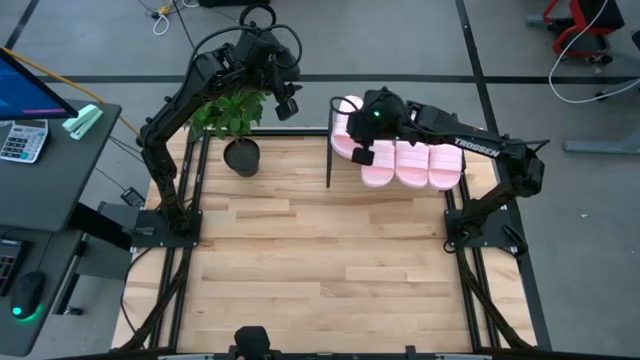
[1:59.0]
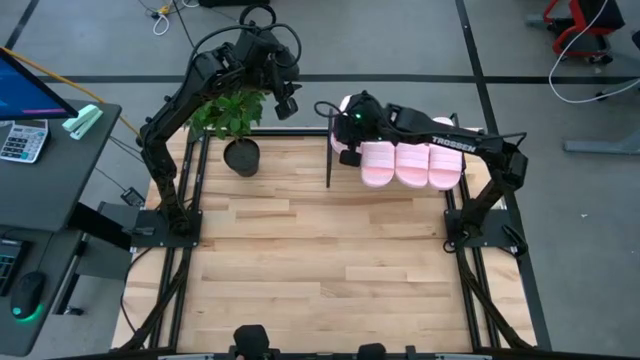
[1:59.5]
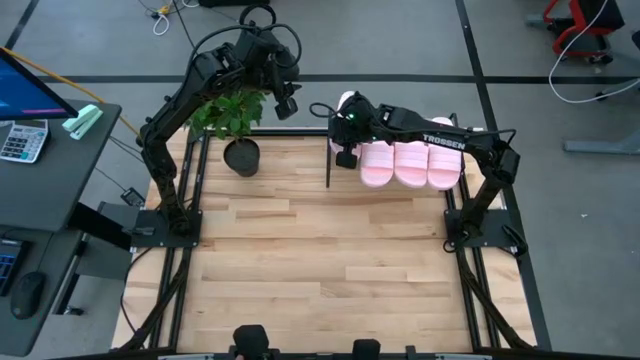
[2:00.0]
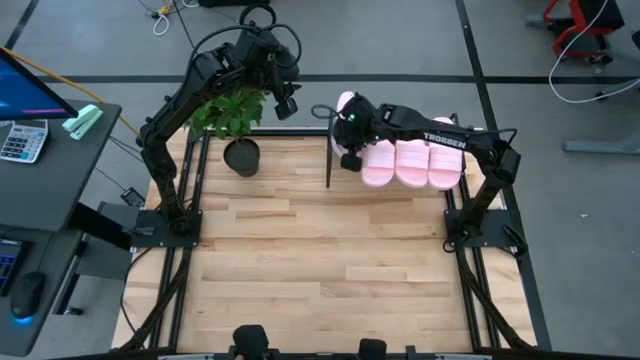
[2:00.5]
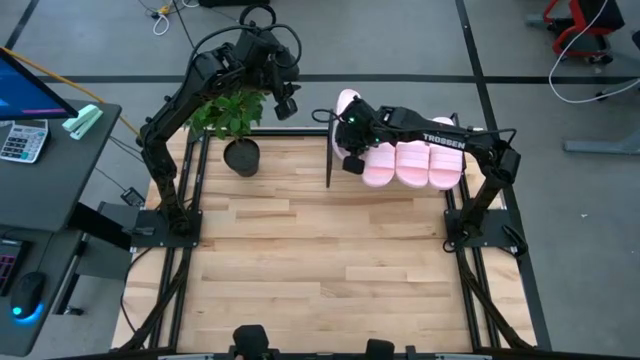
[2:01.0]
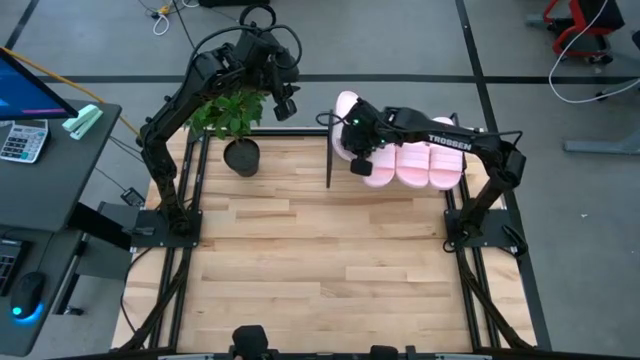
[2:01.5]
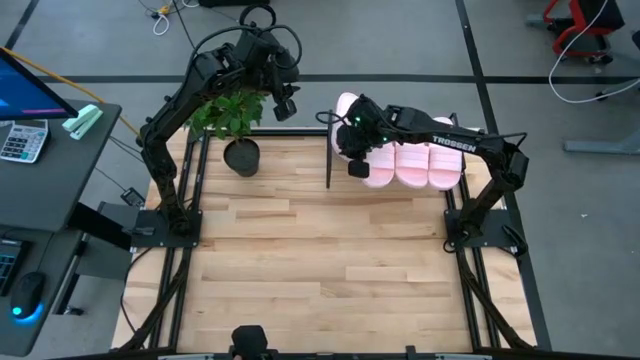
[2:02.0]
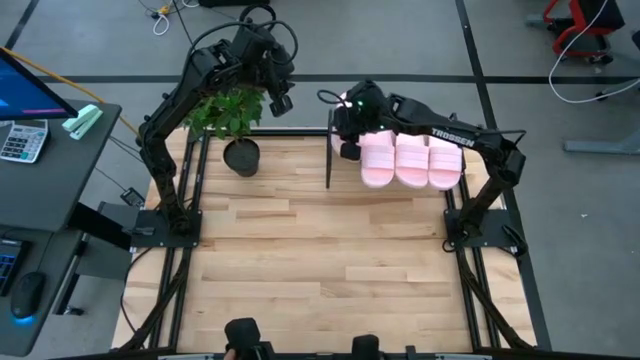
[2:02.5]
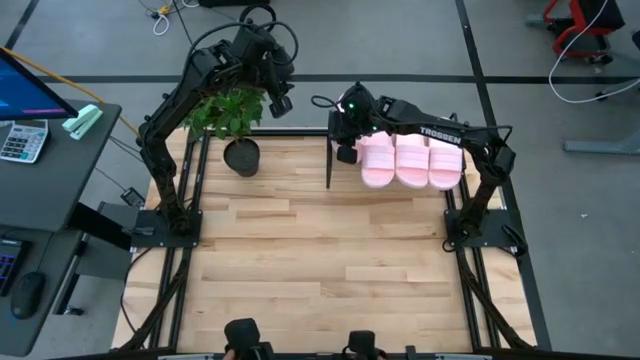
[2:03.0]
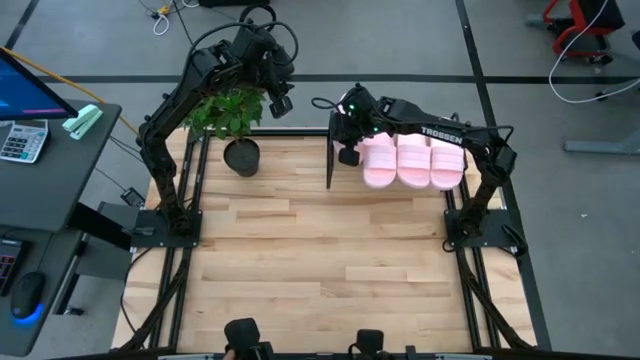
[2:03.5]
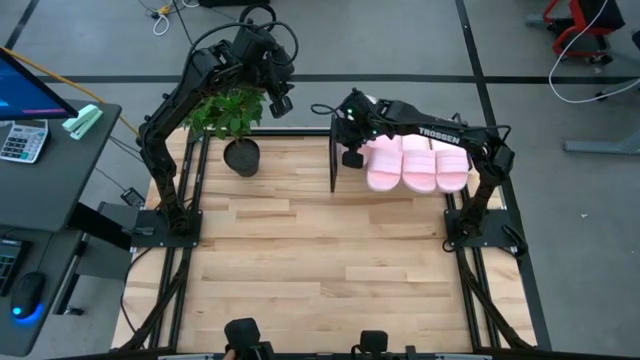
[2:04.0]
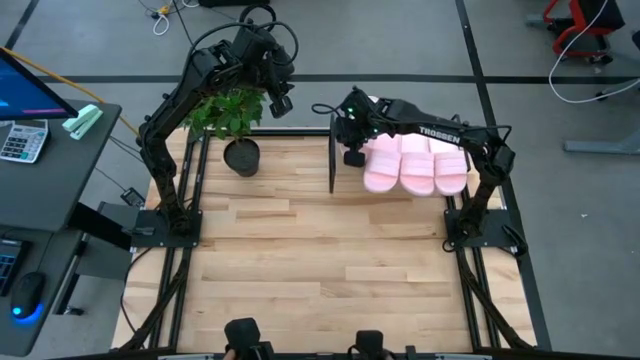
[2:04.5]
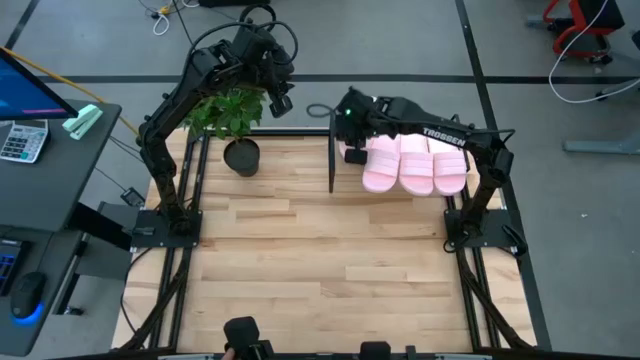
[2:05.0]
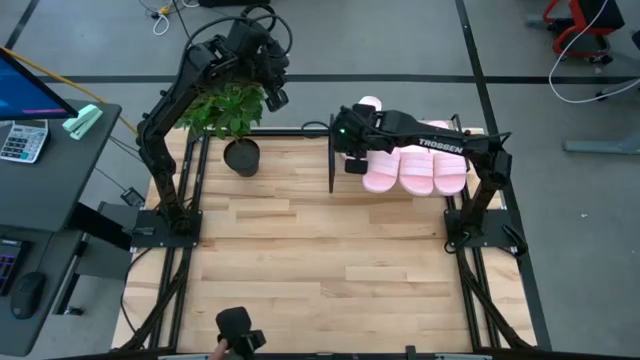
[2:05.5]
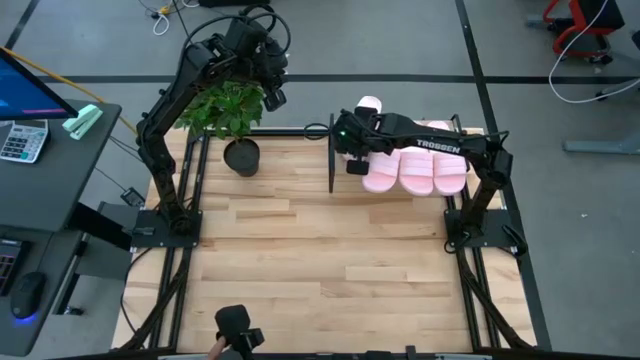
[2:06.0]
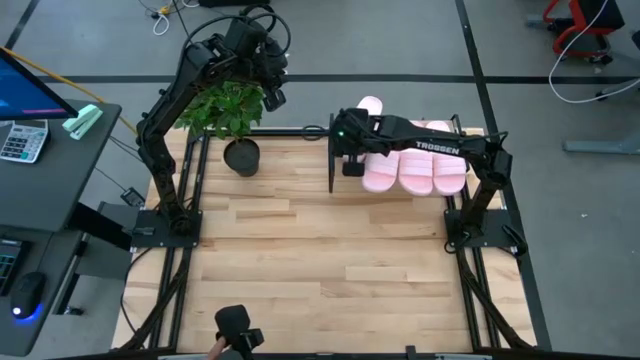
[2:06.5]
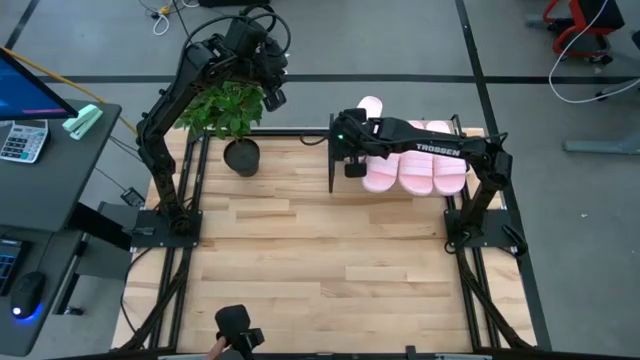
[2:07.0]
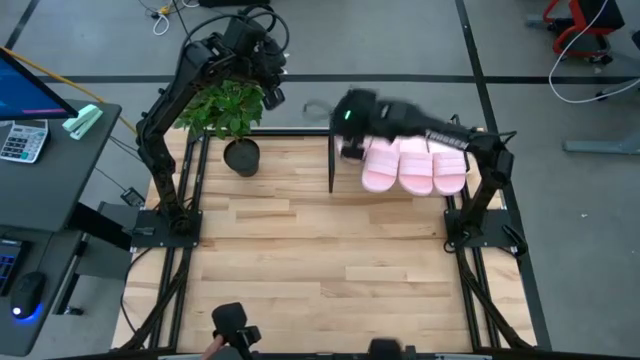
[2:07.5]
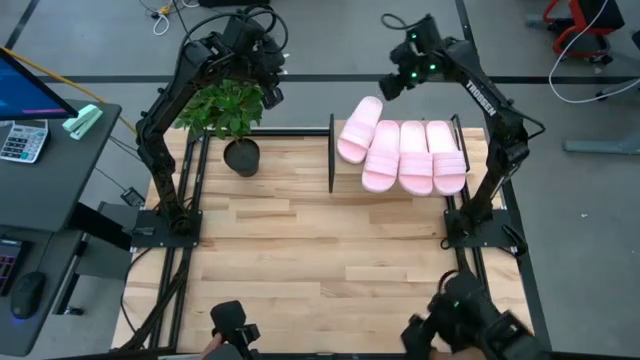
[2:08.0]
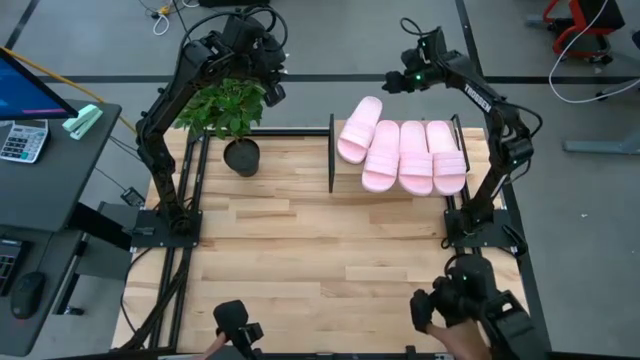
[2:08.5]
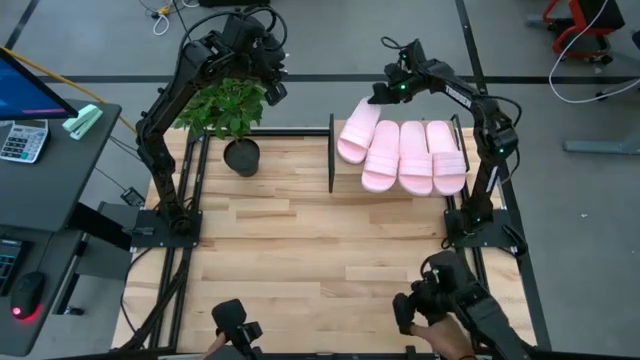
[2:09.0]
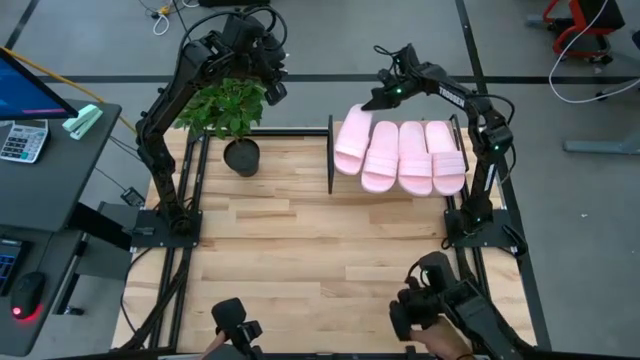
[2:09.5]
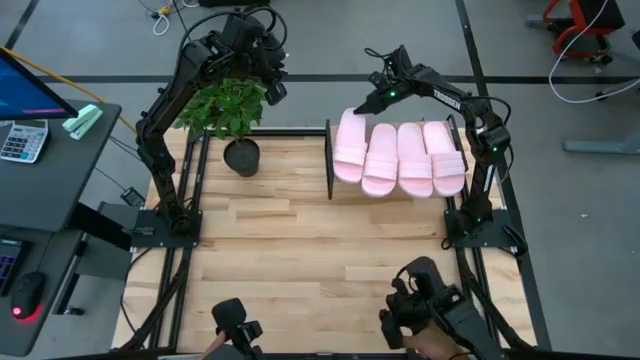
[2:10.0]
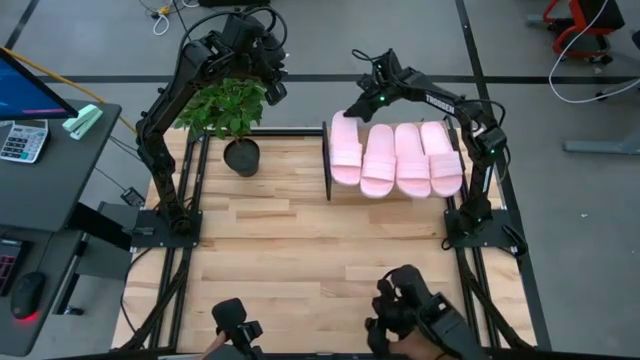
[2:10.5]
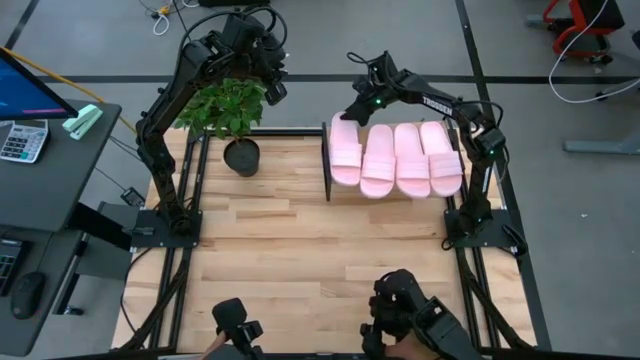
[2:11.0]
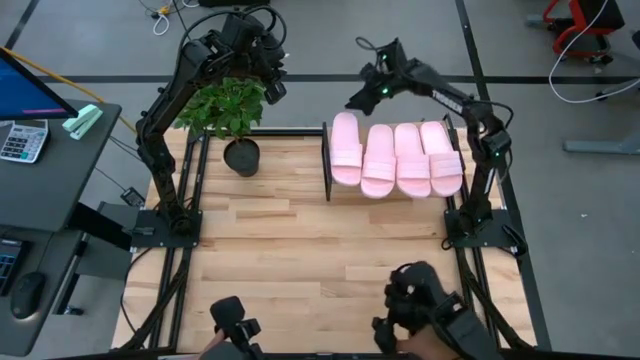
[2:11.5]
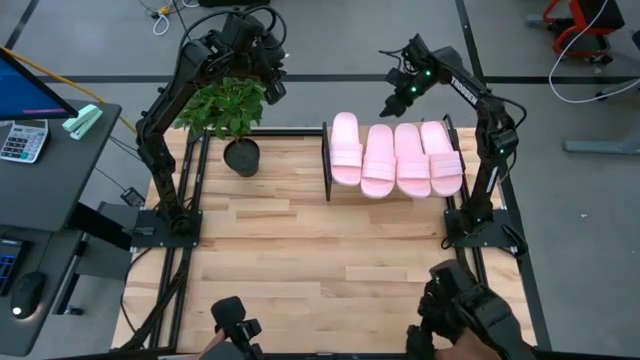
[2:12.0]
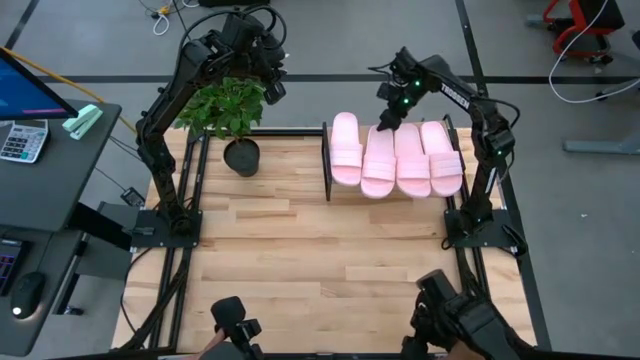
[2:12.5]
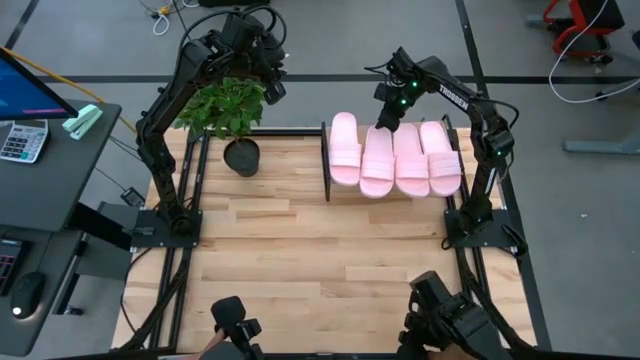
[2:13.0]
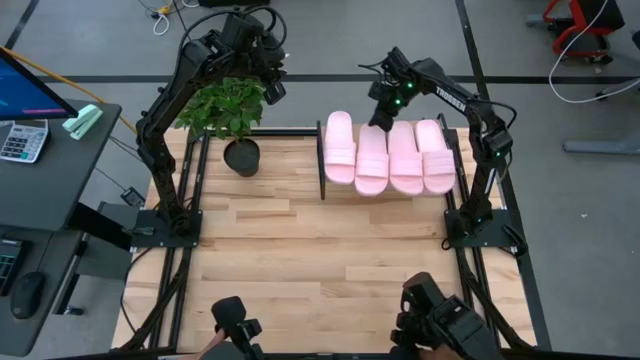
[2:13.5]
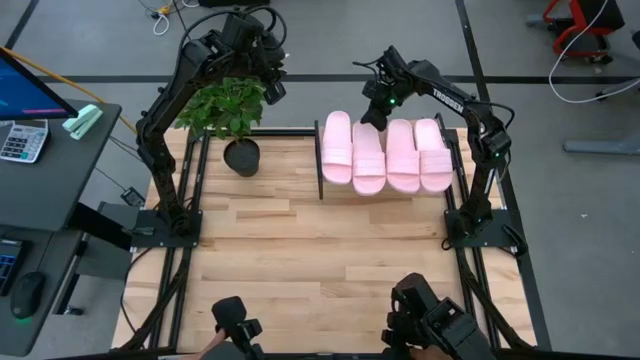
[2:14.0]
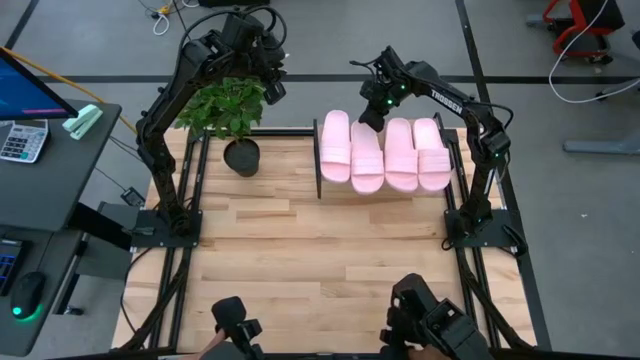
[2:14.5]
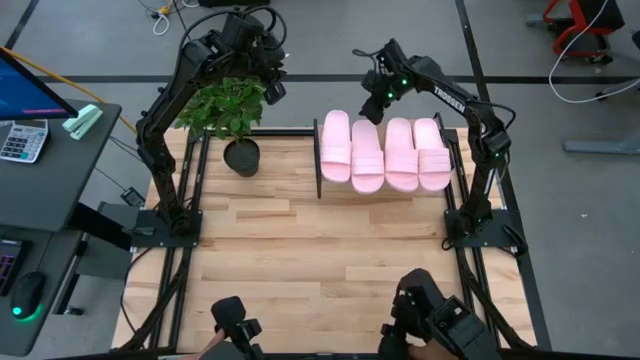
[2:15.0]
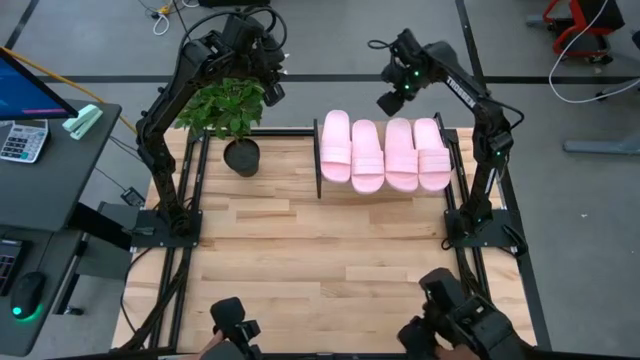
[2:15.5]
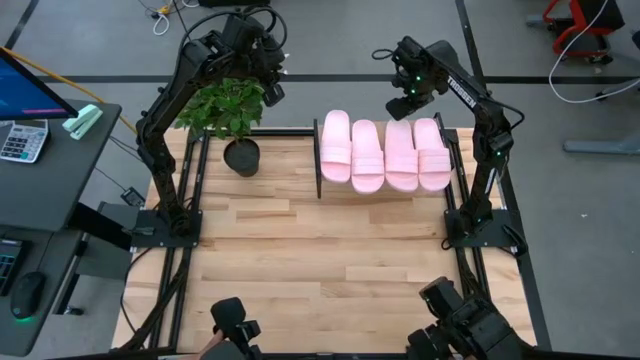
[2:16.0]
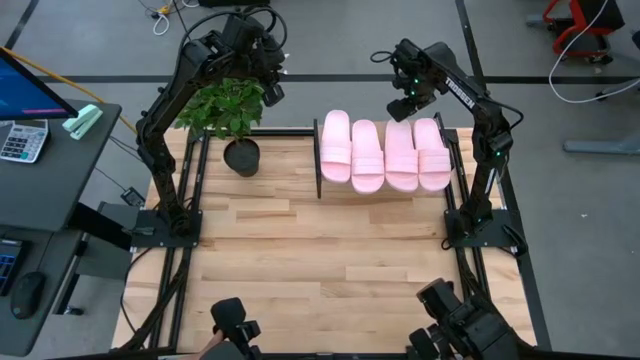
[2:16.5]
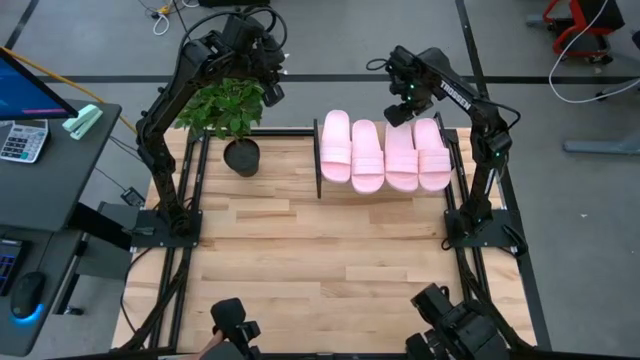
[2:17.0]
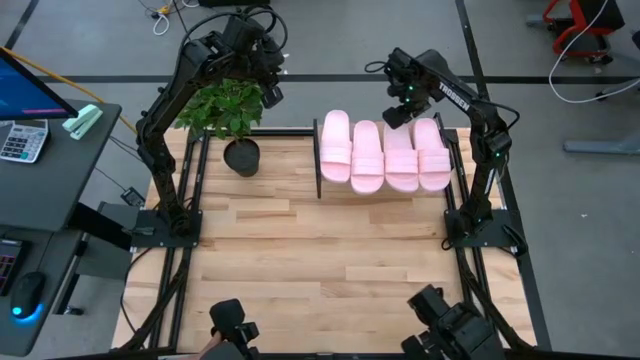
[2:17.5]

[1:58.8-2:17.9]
Task: Pick and place slides into the shelf
Adjust the pink slides on the shelf

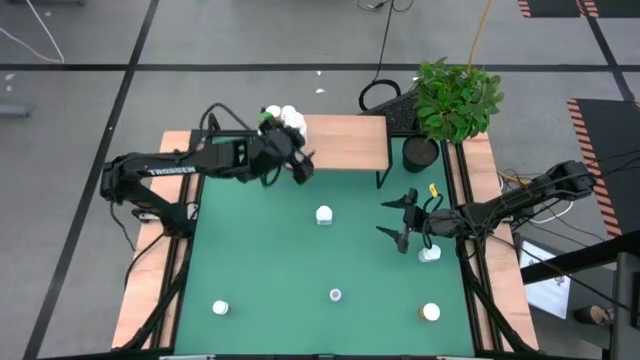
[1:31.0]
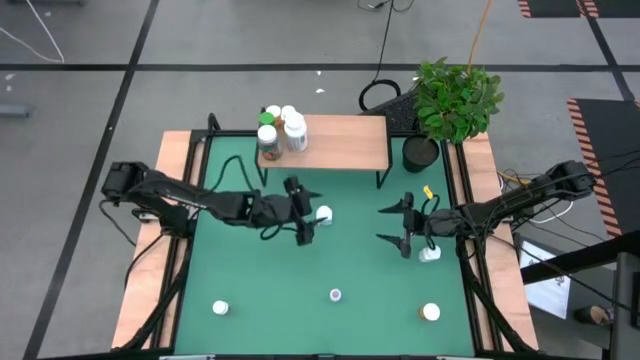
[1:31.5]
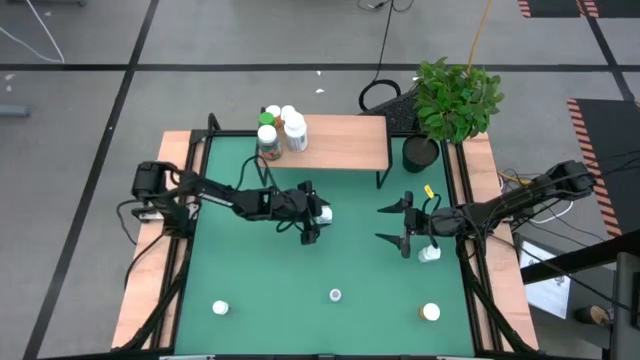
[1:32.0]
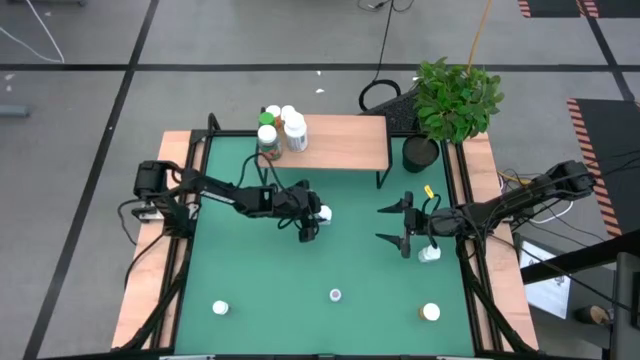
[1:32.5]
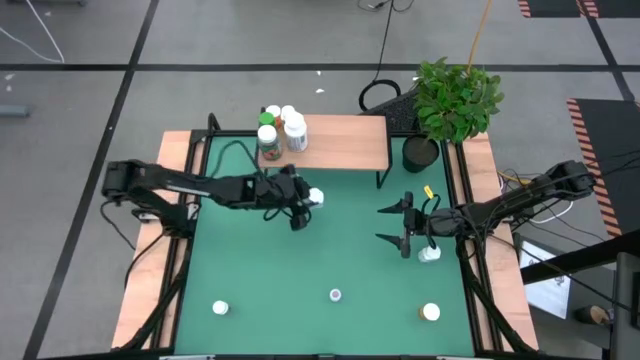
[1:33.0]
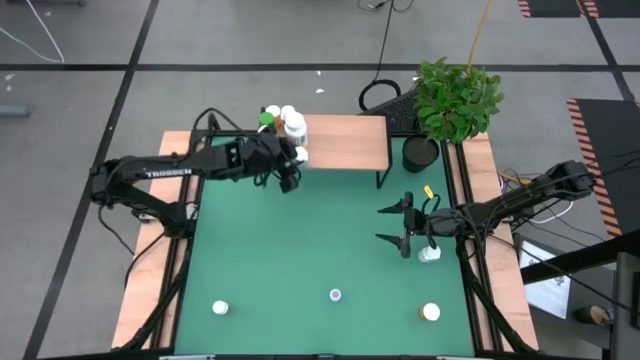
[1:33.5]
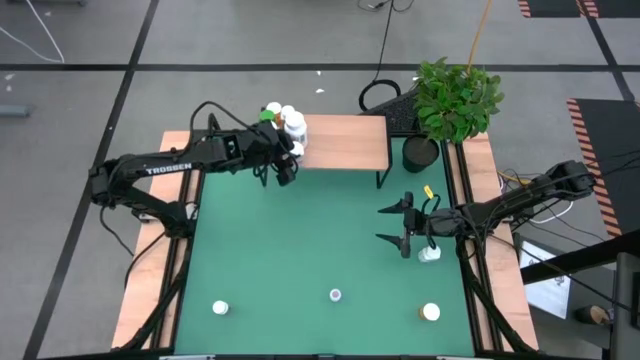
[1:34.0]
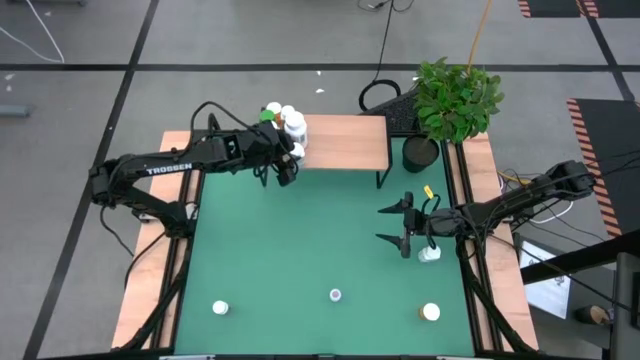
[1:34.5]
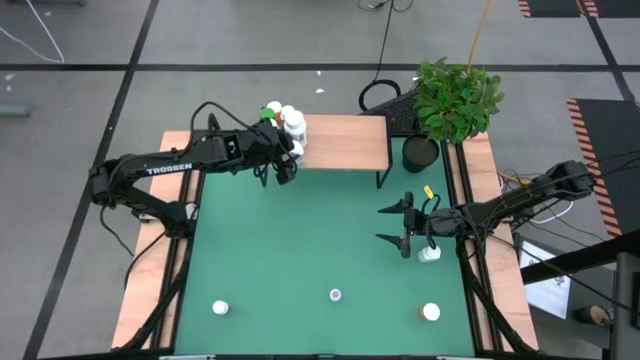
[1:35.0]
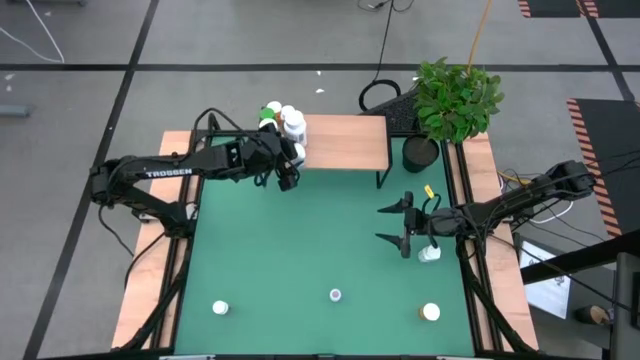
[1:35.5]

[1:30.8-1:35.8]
Task: Pick and place medicine bottles onto shelf by color
Put the top blue bottle on the shelf
